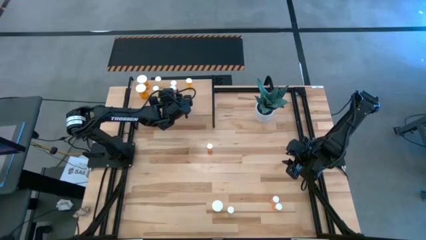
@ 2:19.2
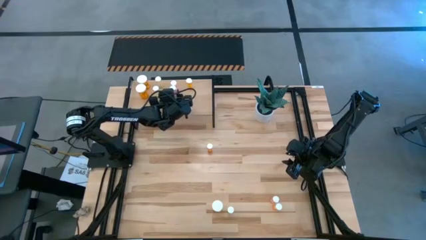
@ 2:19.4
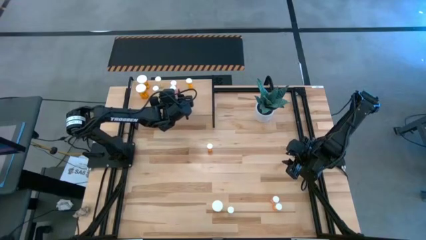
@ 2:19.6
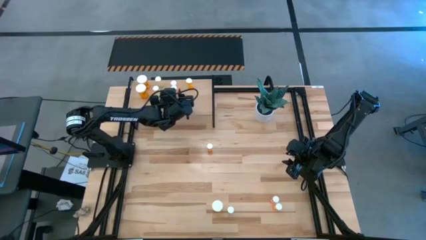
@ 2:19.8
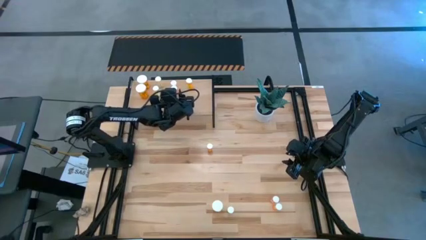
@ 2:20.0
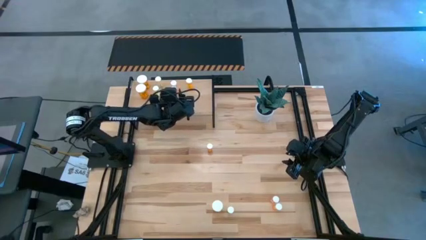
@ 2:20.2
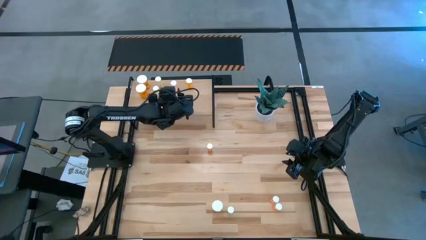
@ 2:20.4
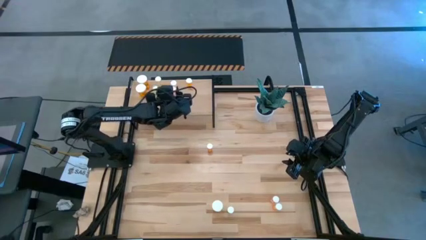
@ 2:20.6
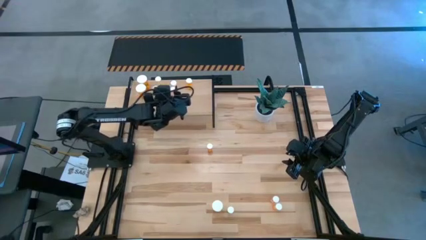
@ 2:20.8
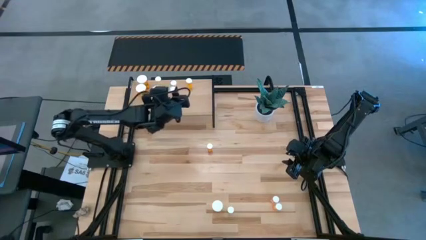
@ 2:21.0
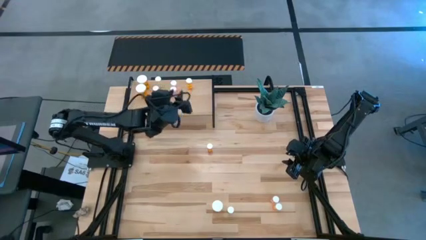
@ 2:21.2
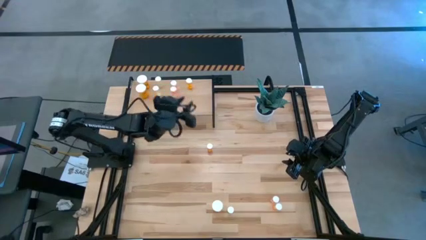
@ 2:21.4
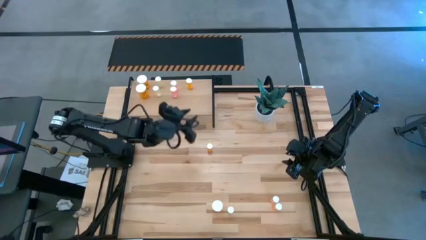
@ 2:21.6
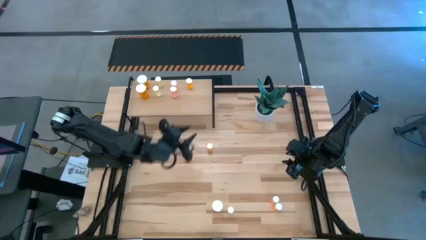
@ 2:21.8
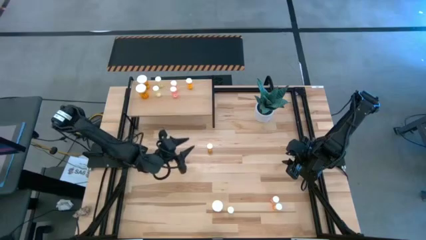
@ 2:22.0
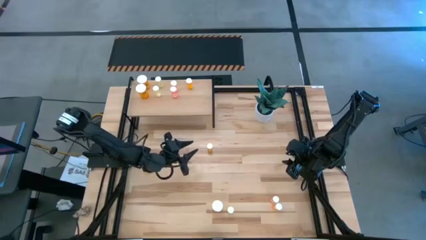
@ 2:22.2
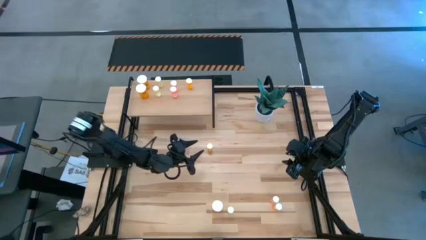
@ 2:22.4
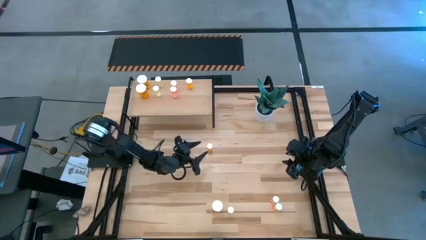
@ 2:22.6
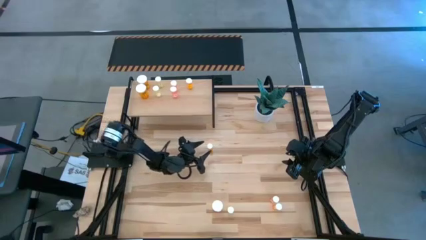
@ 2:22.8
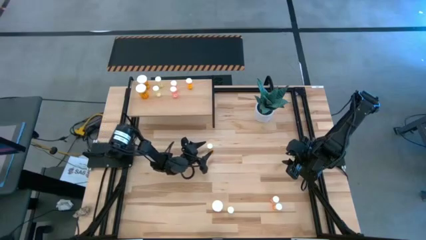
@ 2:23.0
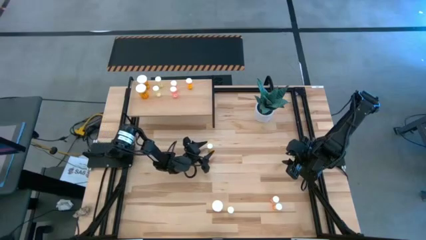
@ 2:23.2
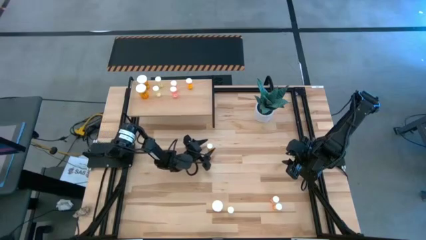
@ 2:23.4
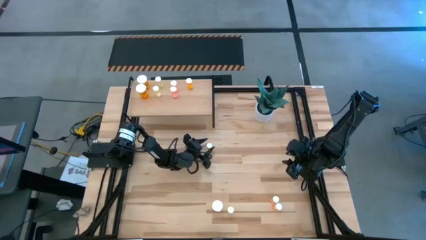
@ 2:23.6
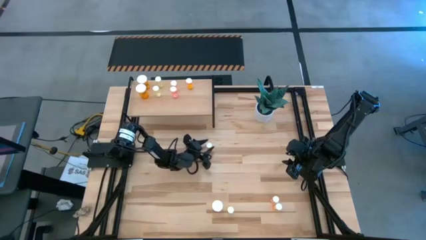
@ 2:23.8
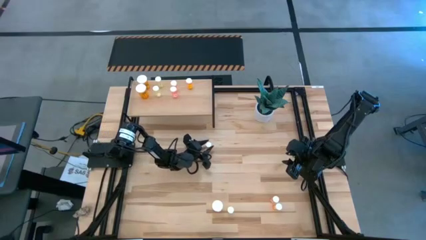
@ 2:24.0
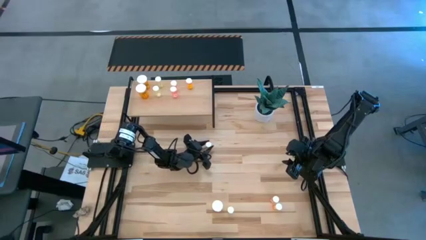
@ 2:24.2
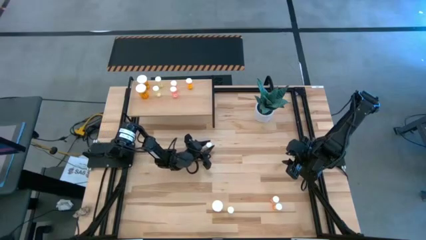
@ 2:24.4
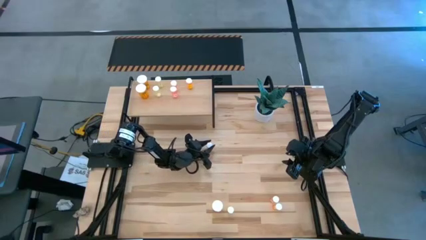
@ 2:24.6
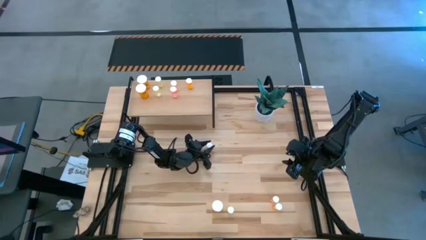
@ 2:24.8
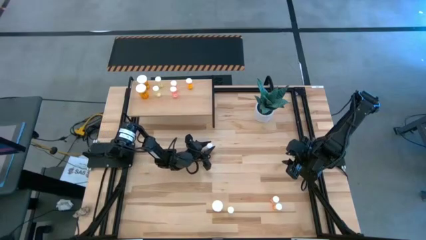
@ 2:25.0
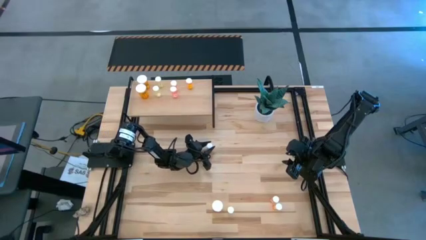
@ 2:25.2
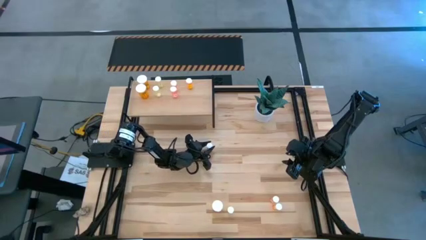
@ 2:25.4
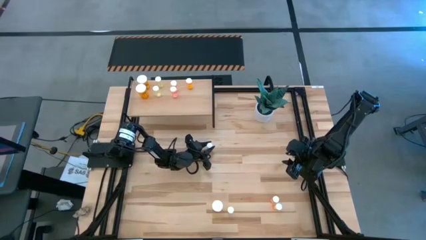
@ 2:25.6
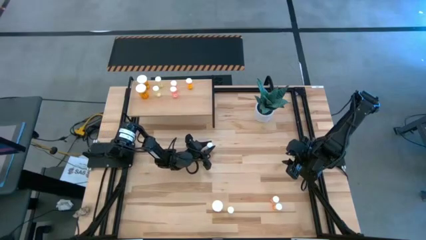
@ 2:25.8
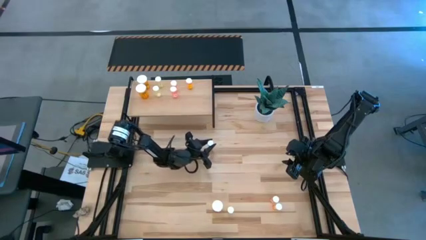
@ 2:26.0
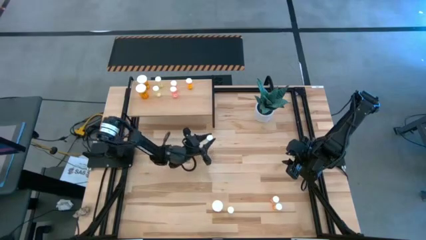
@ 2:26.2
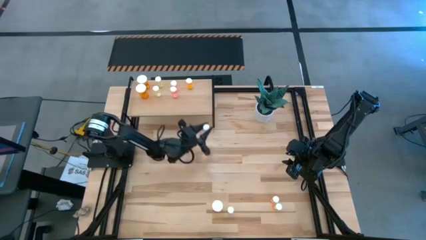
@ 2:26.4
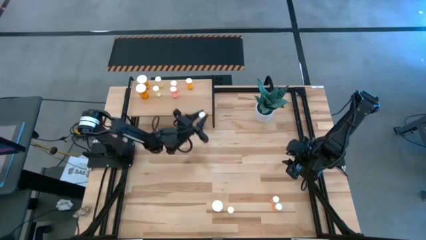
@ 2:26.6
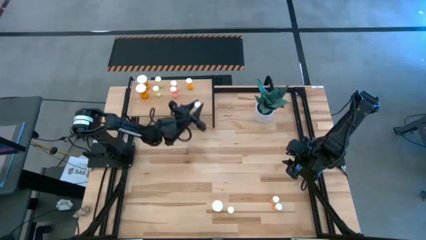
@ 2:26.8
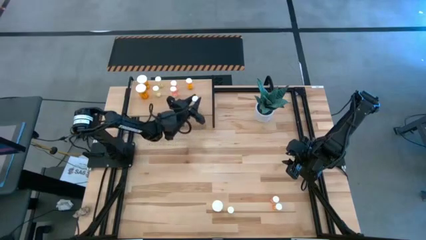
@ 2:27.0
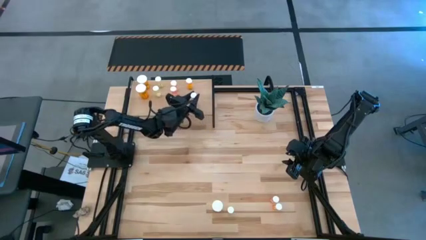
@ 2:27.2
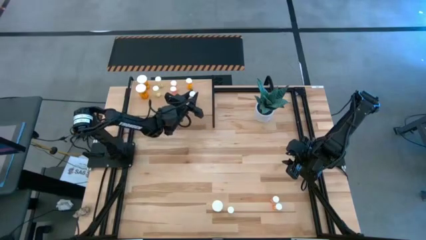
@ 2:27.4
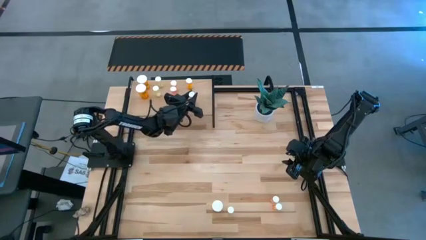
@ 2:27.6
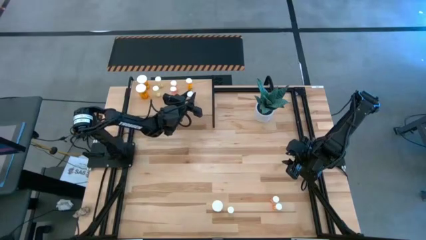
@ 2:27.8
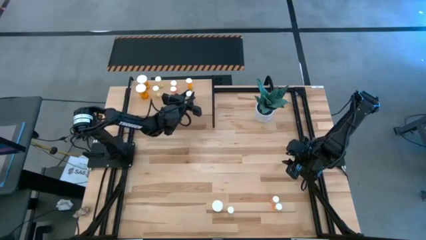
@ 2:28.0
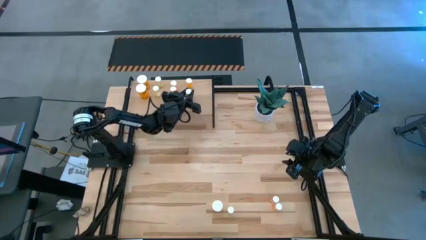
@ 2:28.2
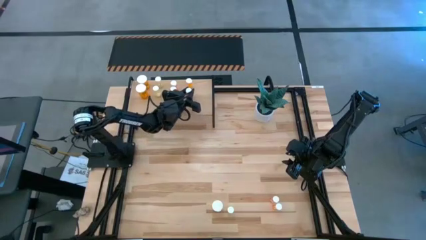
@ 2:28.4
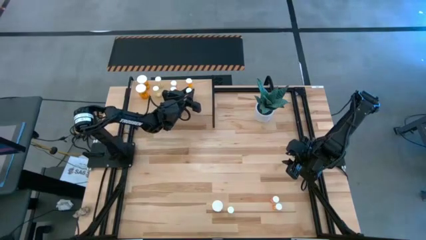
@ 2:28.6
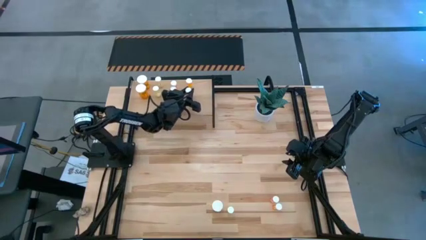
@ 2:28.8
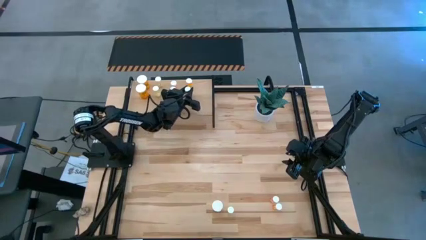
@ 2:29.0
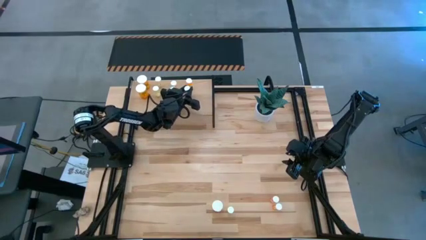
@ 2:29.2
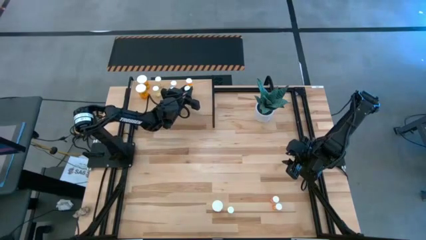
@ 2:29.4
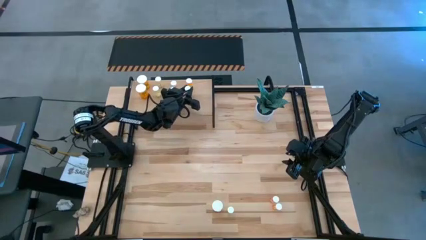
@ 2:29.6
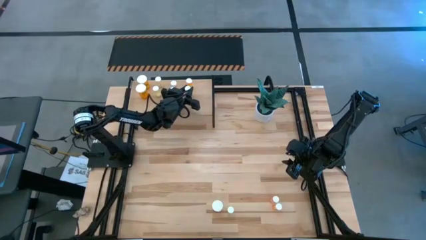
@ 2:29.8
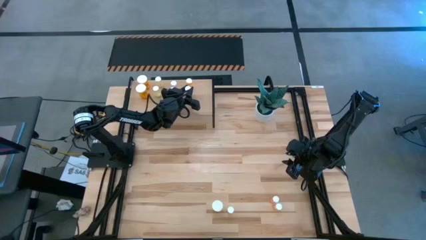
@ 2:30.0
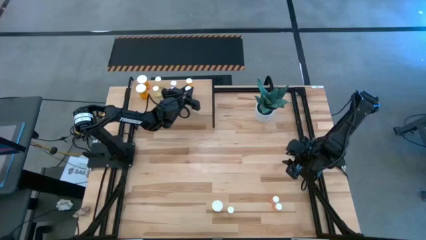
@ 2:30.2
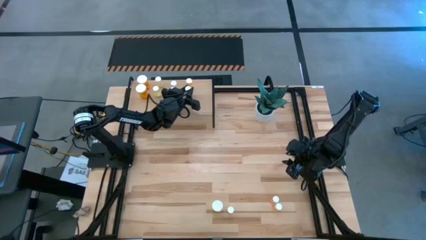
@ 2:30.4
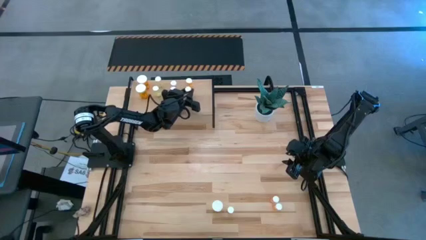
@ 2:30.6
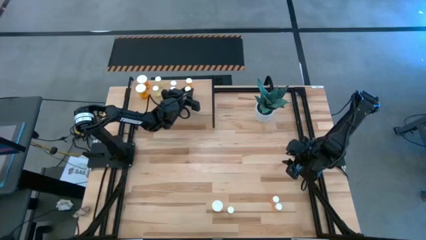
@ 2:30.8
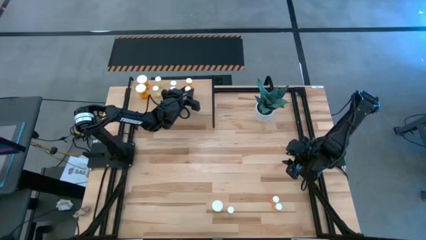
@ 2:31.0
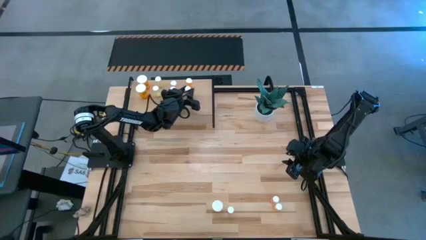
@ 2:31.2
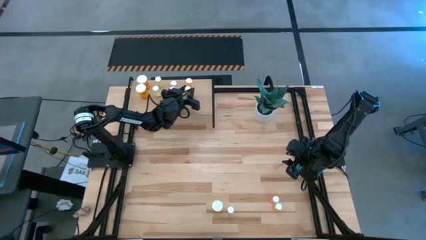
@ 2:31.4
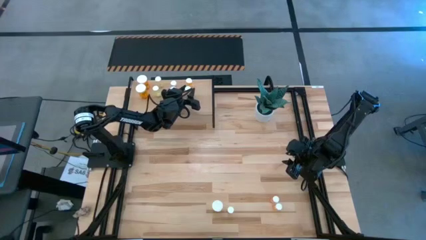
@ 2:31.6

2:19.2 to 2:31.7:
Task: Pick and place medicine bottles onto shelf by color
Put the small orange pill bottle on the shelf aligned with the other small orange pill bottle
